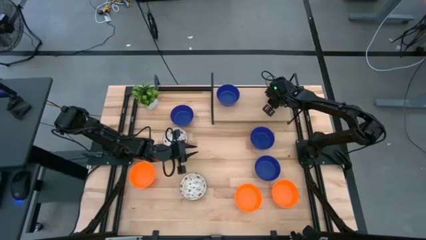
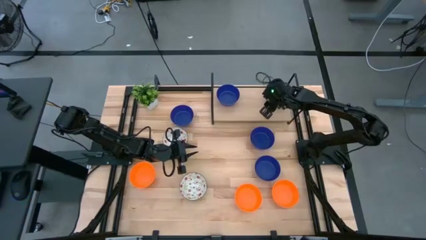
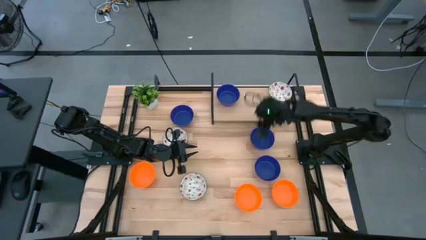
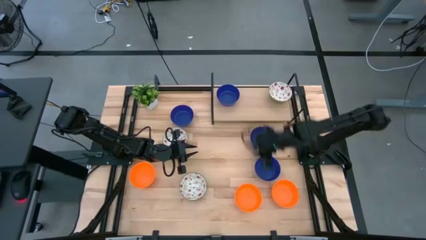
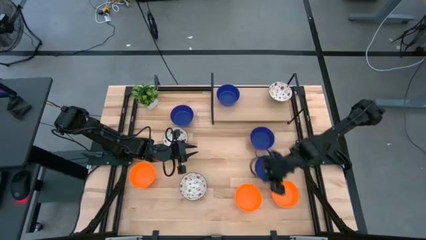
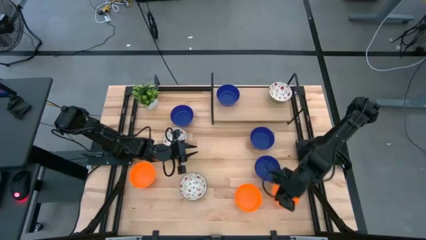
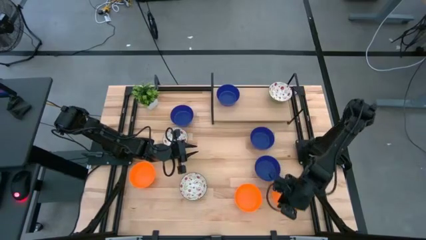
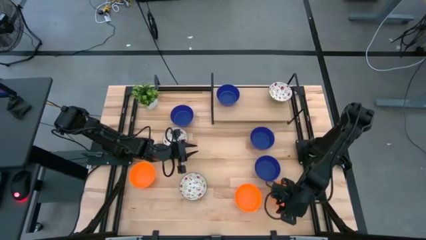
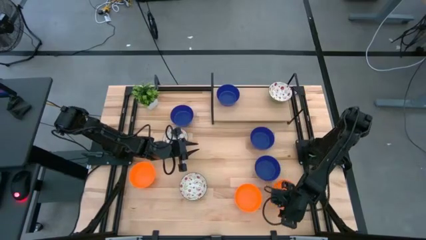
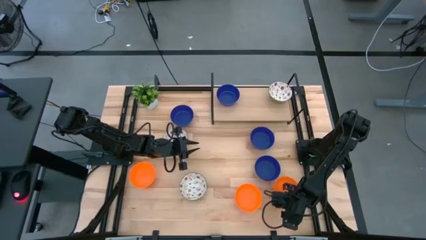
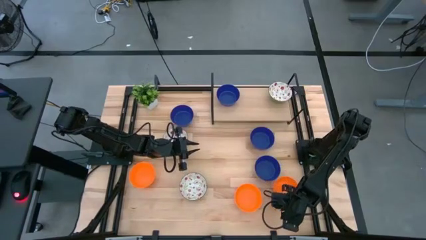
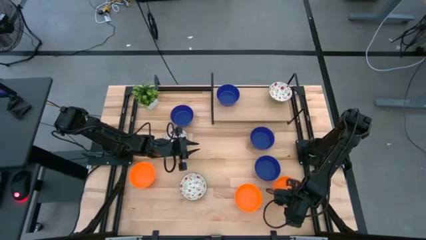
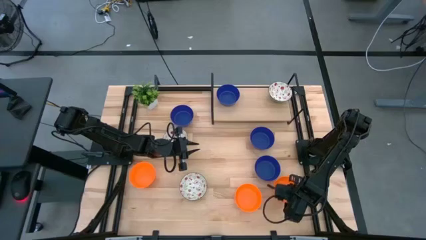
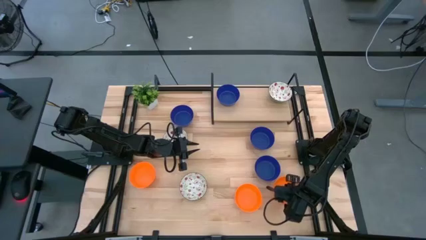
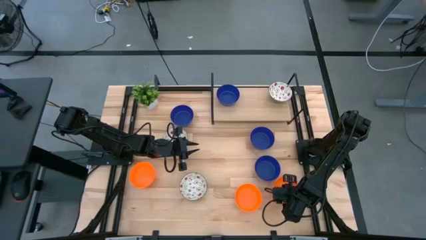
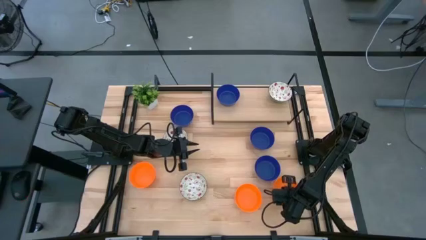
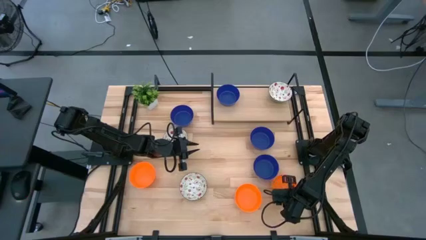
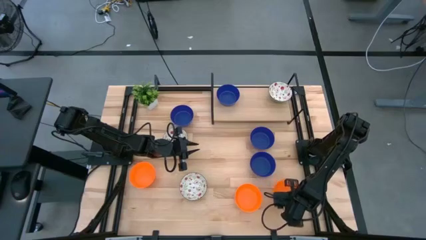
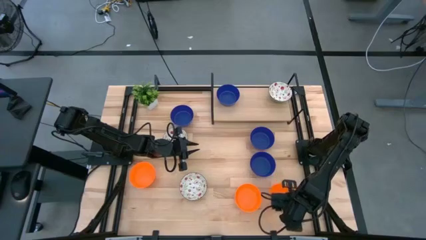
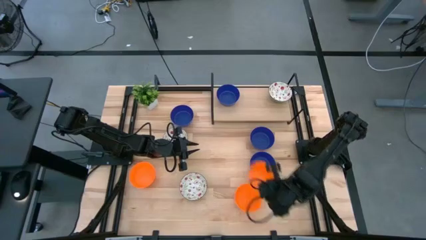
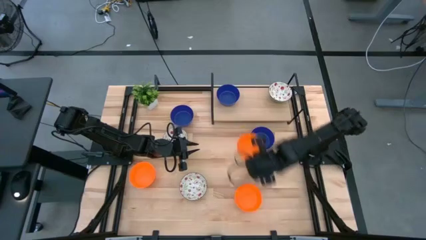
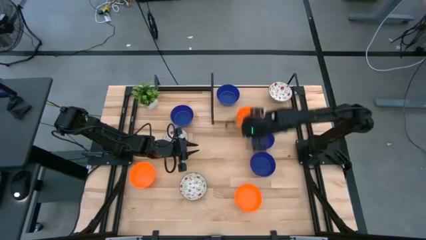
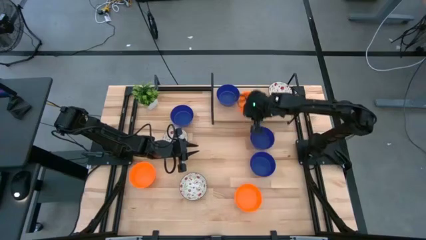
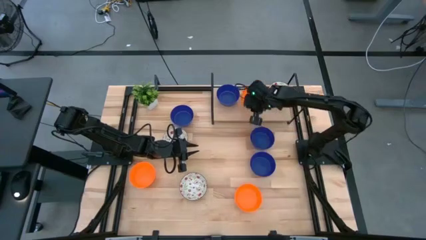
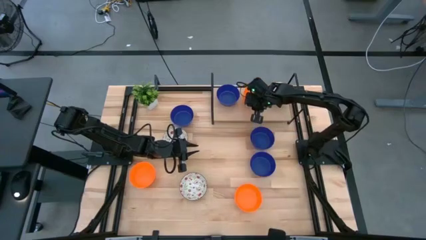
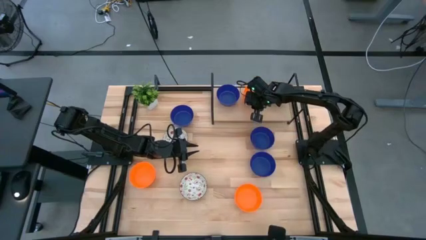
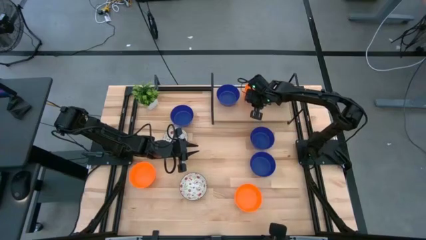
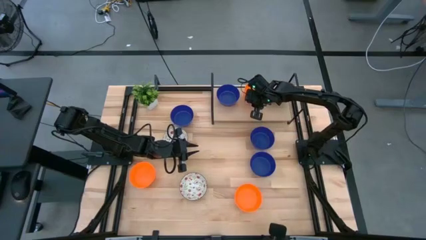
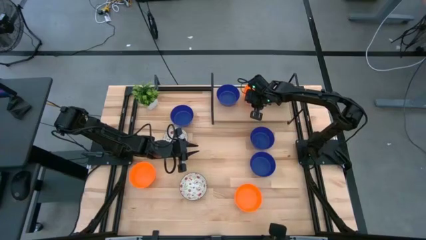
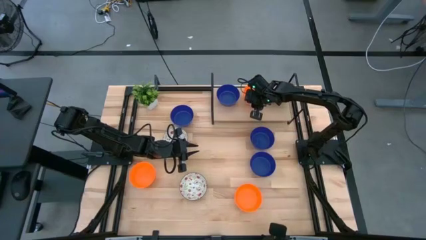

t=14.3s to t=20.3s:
Task: Pick & Place Mini bowls
Put the orange bowl on the shelf

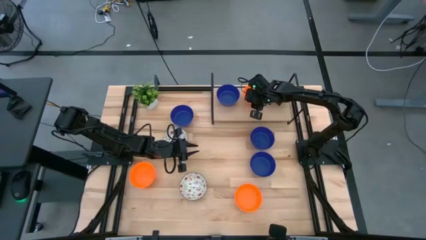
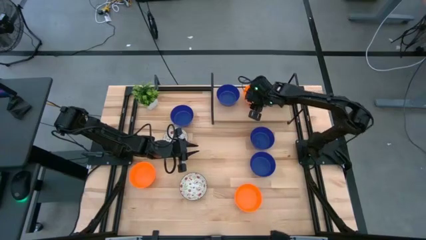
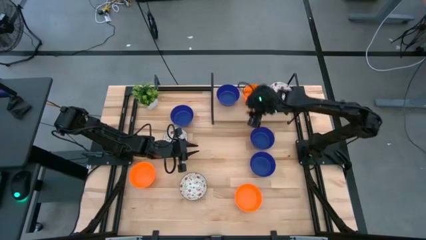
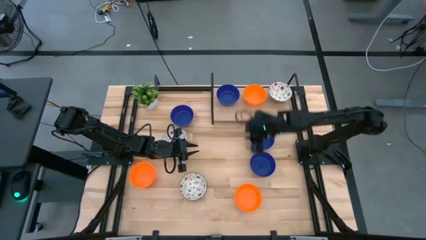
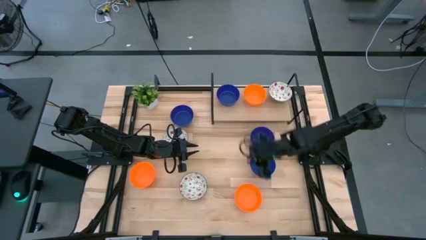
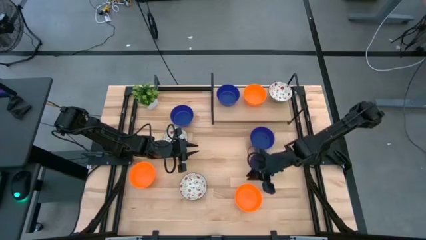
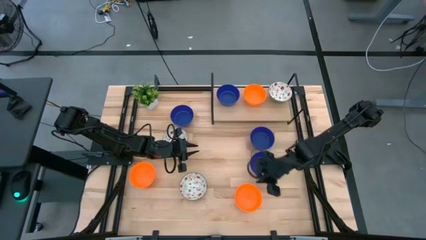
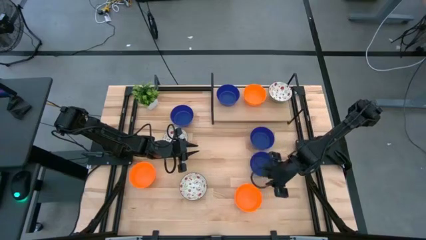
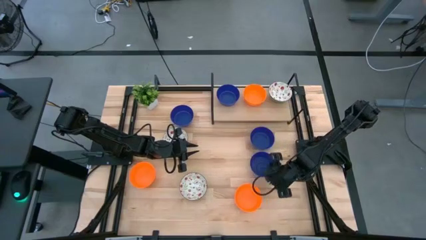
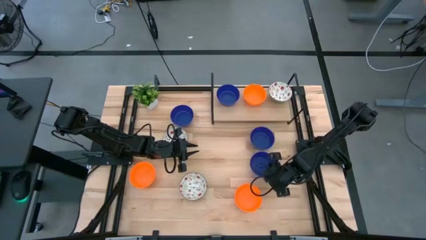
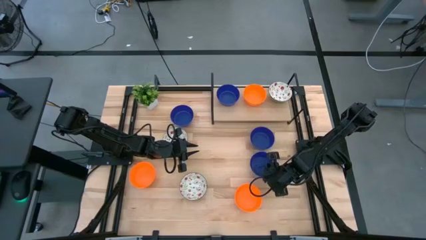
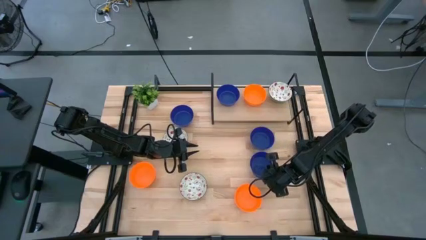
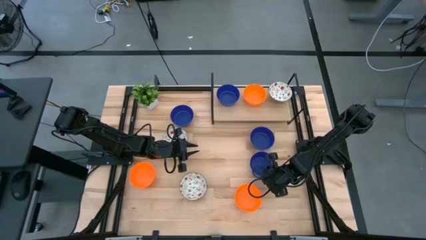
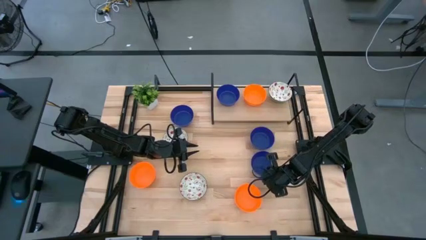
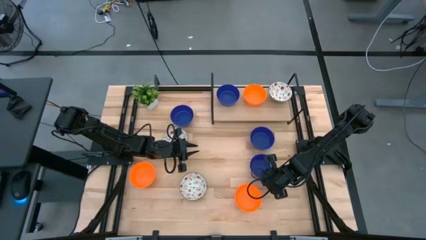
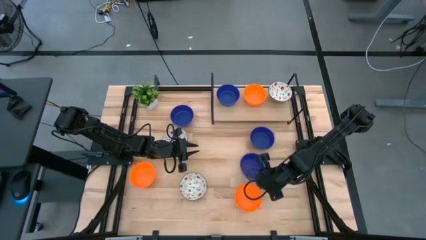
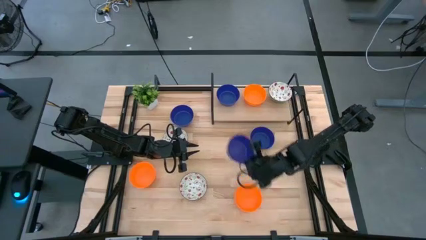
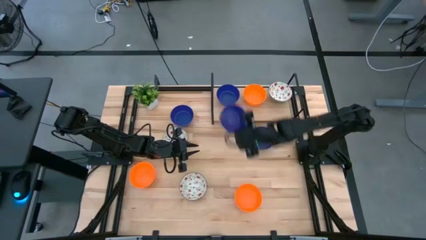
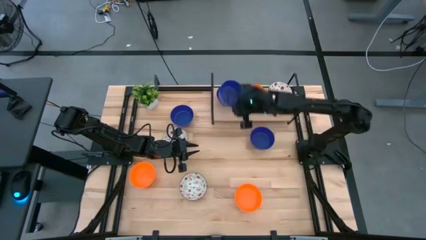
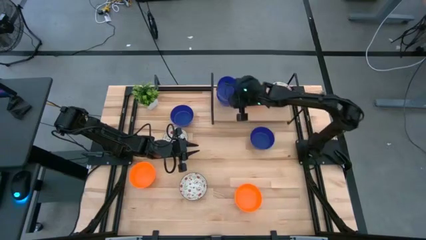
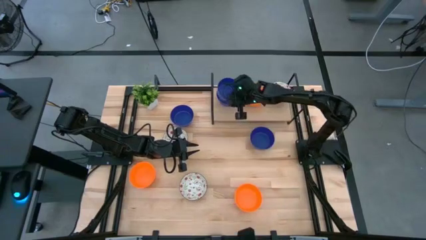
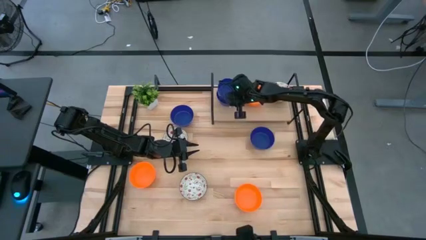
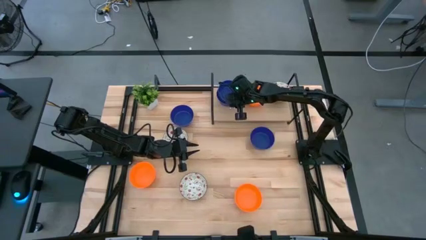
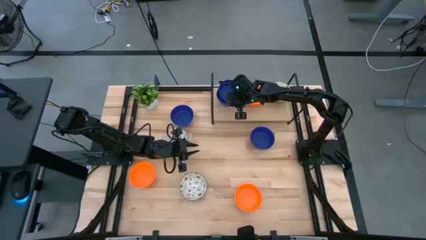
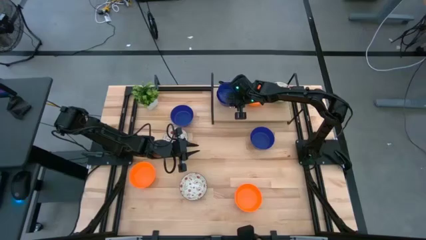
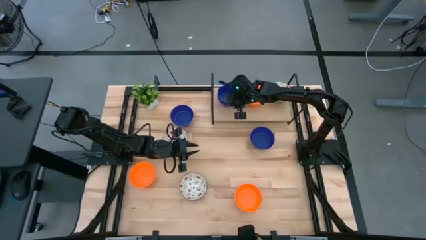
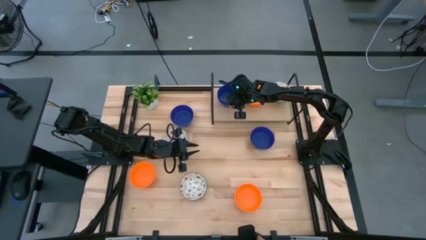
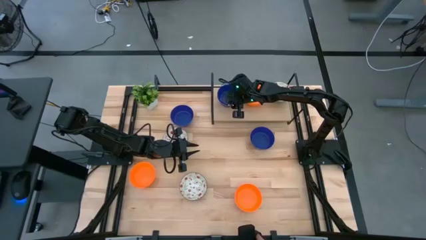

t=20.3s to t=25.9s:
Stack the blue bowl on top of the blue bowl on the shelf

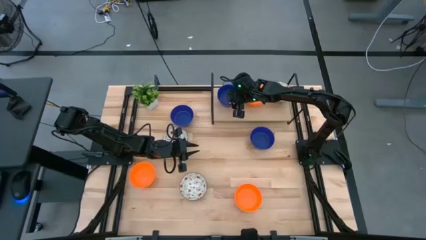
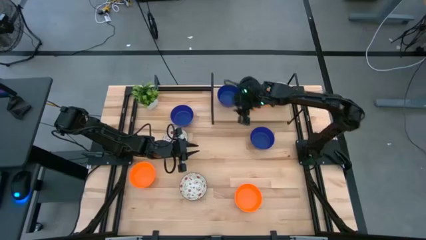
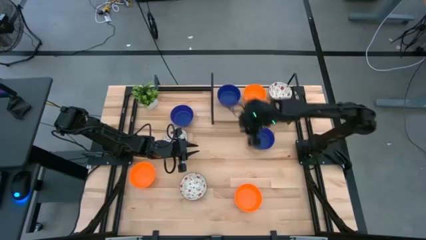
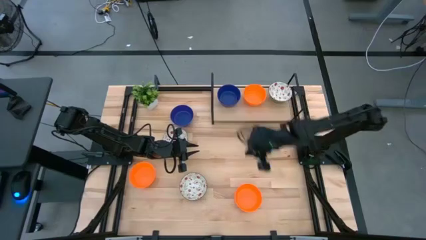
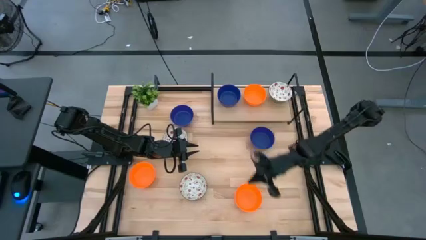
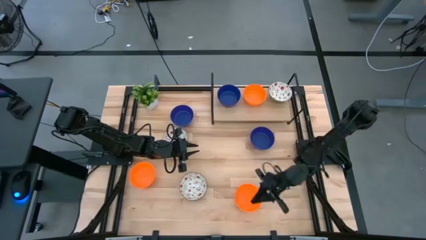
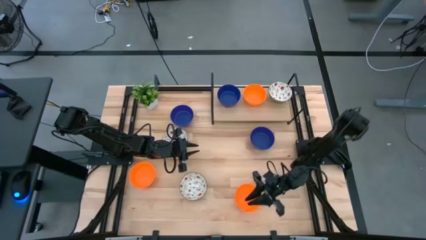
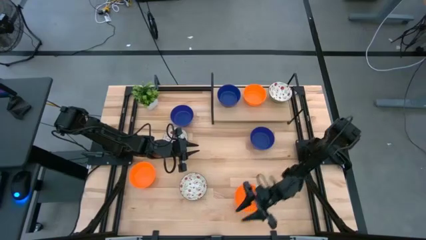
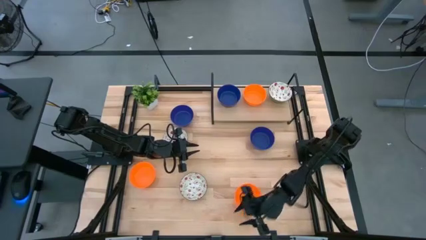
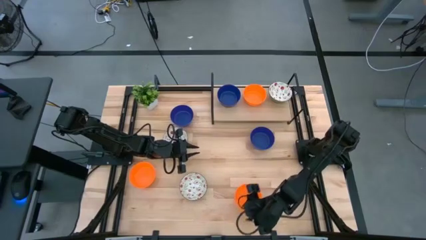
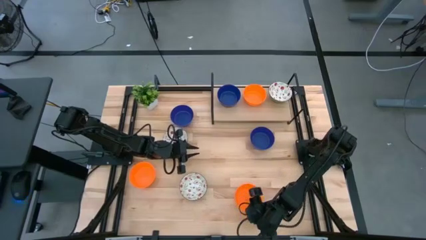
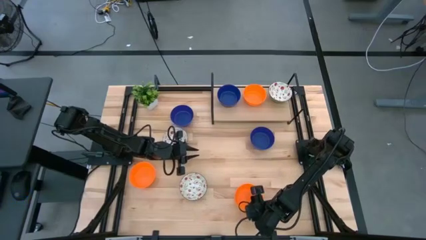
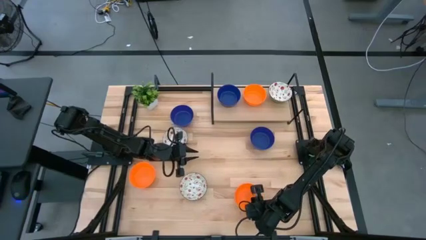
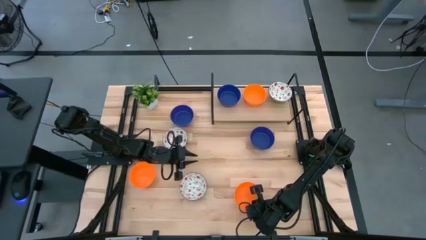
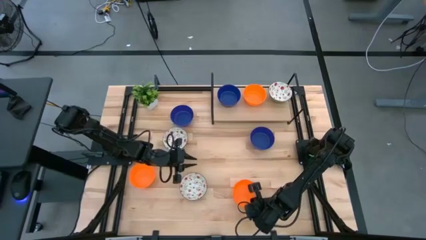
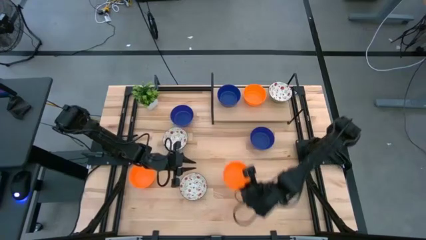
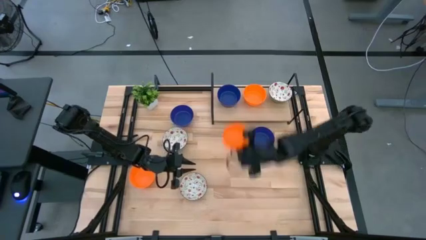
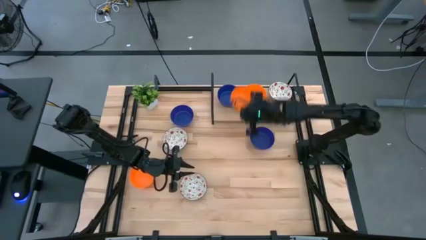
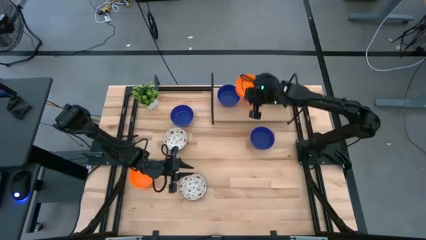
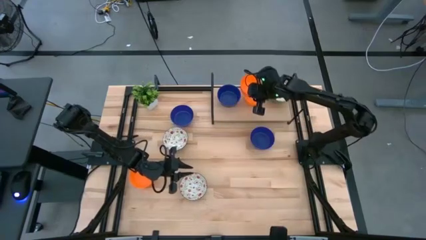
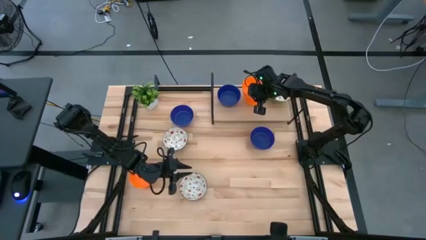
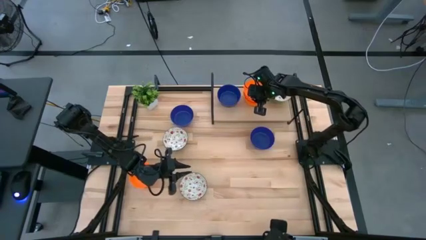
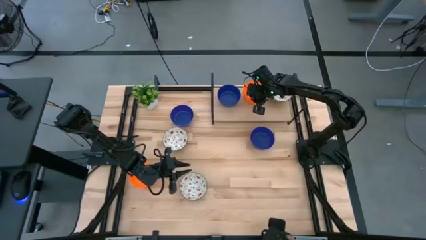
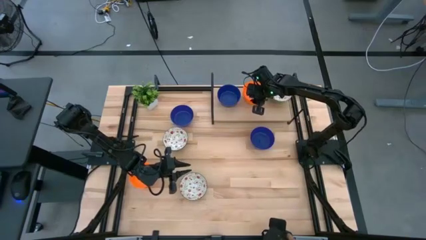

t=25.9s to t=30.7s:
Stack the orange bowl on top of the orange bowl on the shelf
